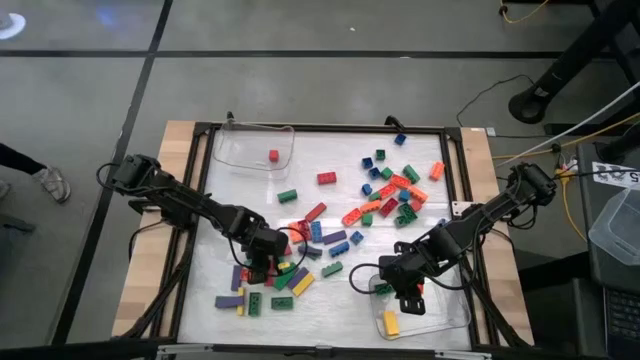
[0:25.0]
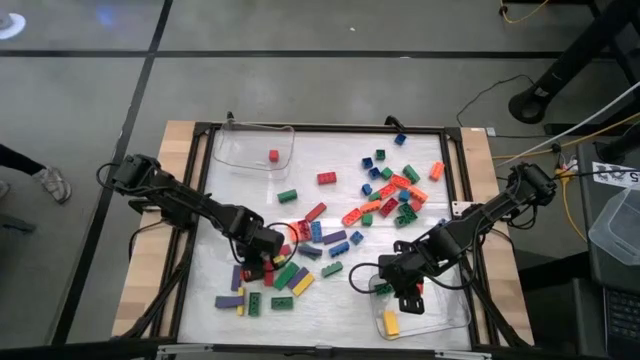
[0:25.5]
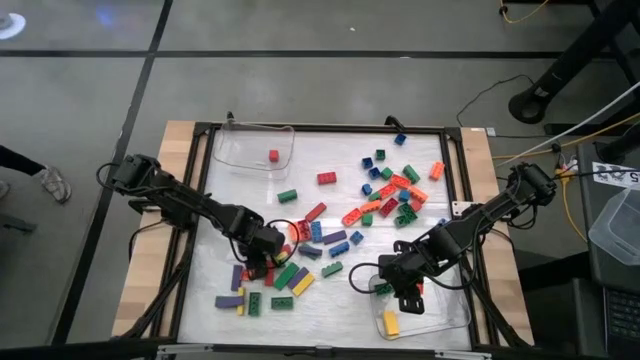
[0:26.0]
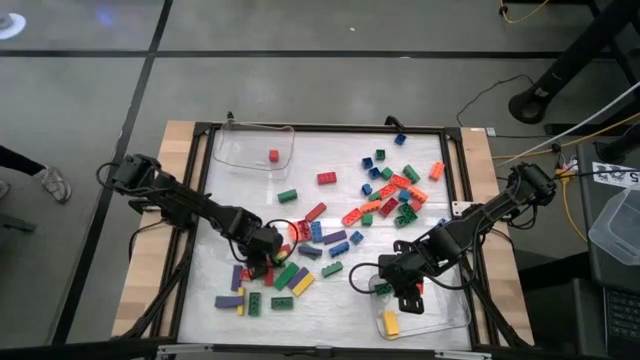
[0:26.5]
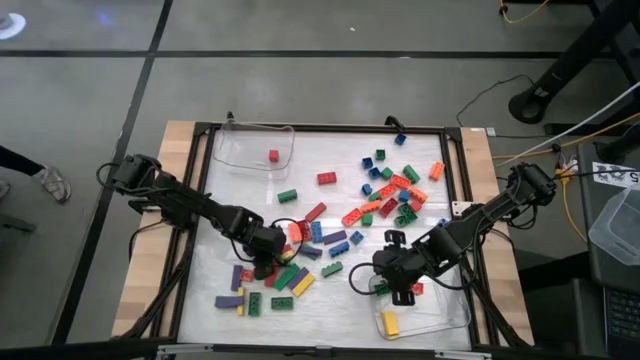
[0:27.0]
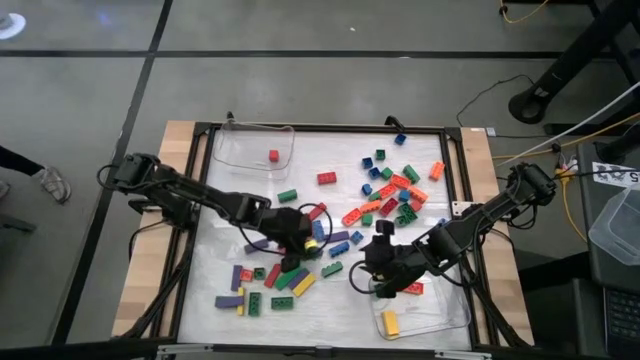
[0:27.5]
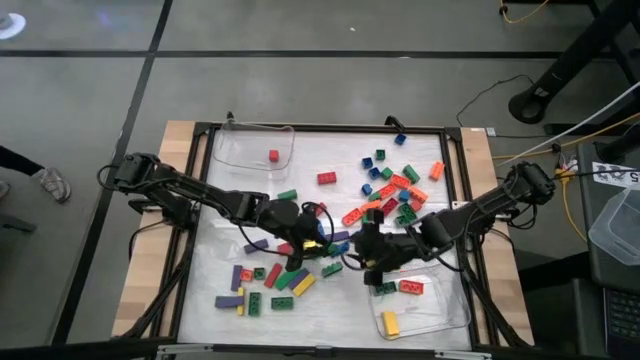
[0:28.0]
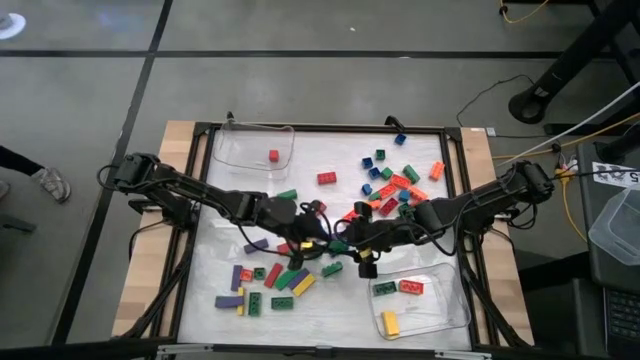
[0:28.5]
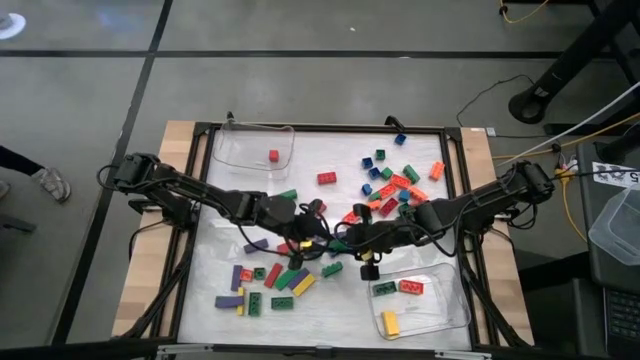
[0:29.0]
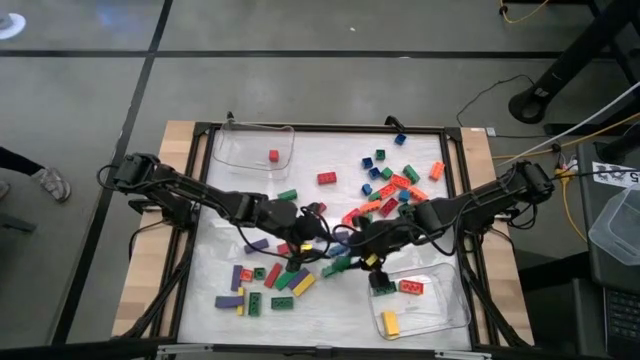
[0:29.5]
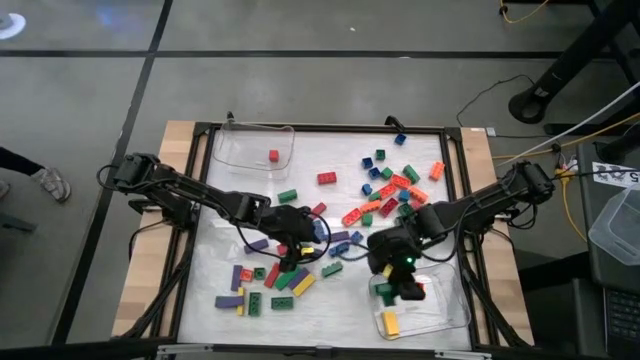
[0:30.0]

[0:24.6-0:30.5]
Task: Sort blocks by size
Put the rectangular green game piece into the bottom transparent bin

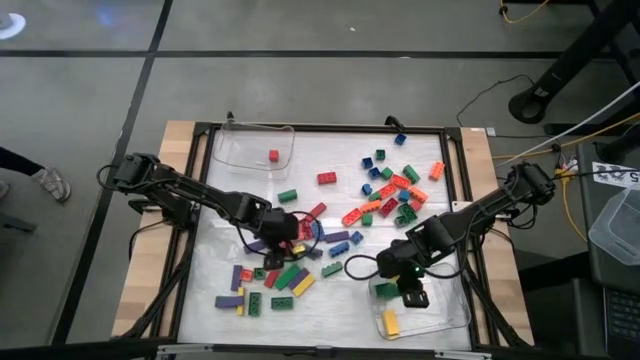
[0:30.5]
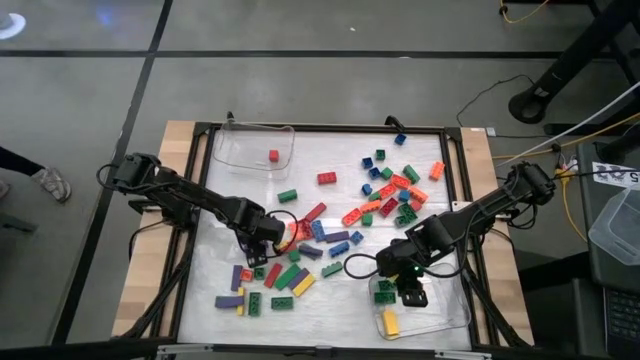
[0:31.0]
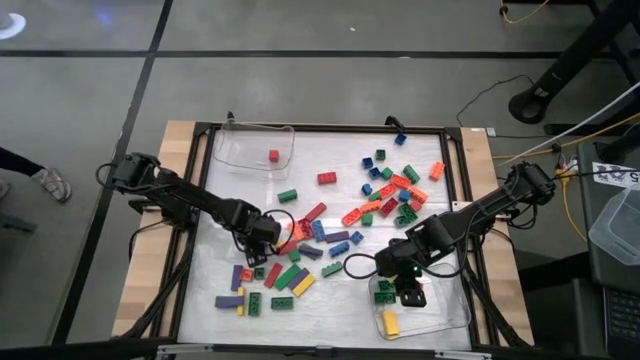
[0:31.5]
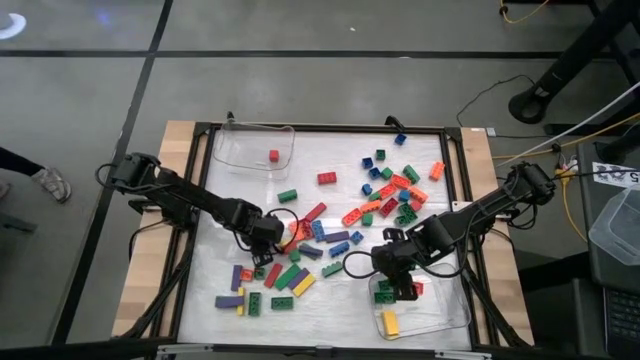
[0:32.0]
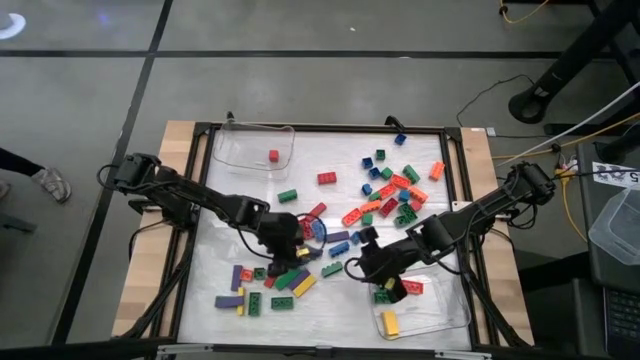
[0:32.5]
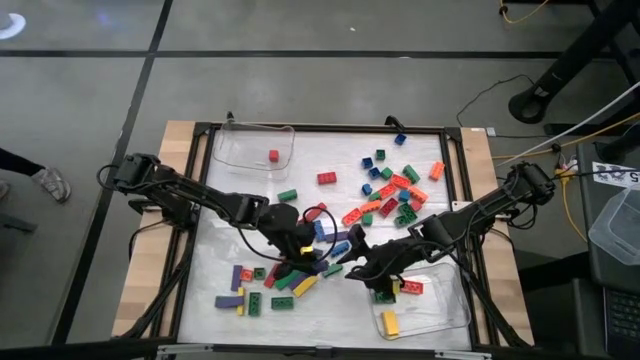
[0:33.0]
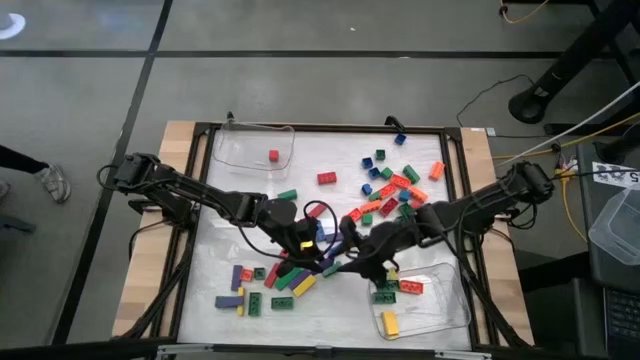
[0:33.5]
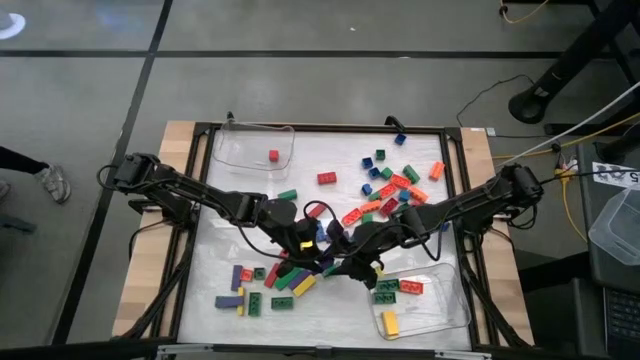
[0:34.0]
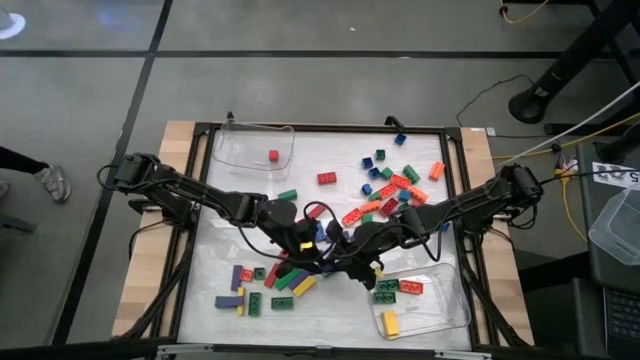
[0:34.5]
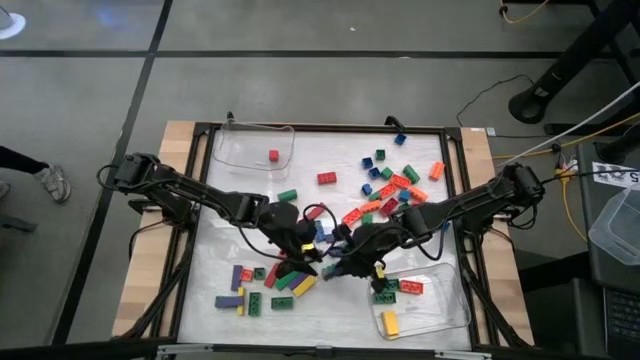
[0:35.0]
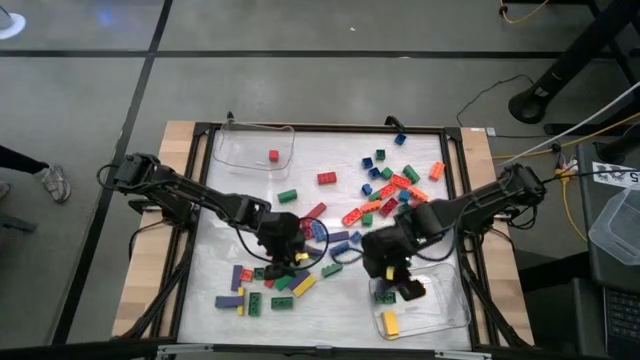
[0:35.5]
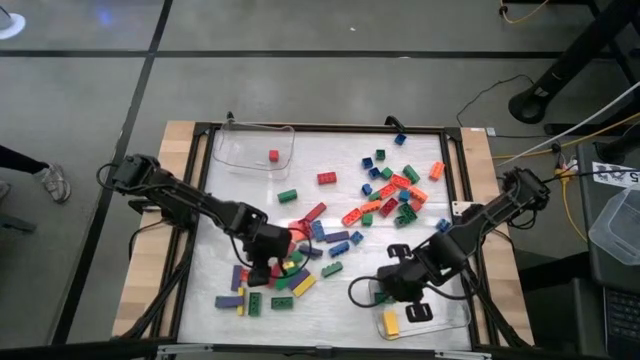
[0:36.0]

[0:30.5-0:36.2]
Put the rectangular violet block into the bottom transparent bin

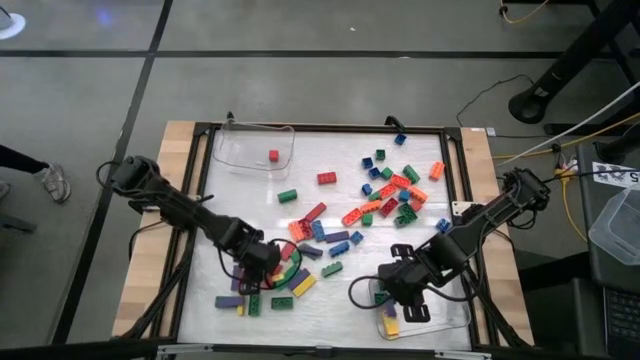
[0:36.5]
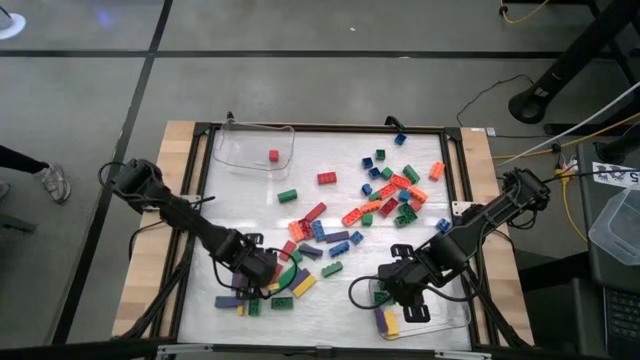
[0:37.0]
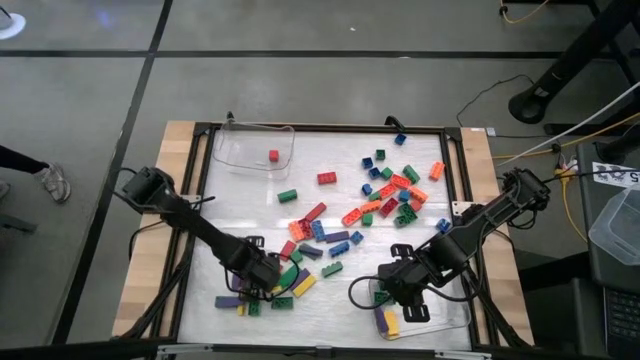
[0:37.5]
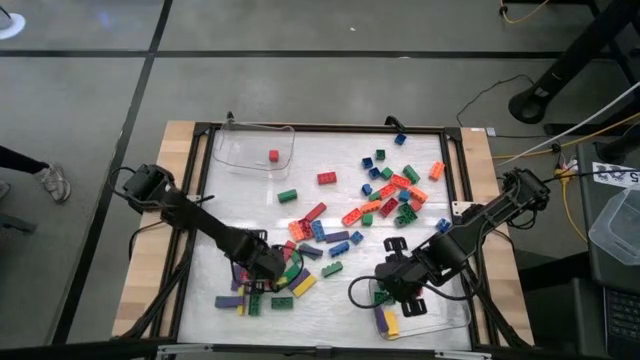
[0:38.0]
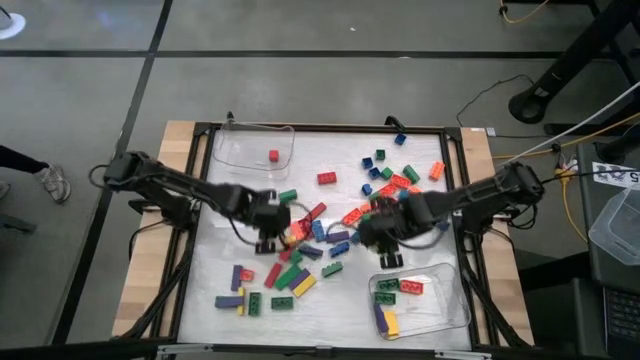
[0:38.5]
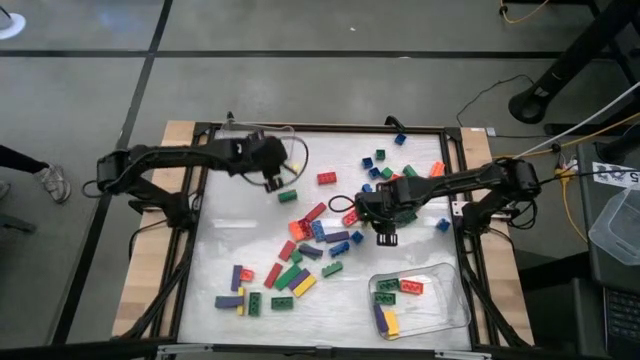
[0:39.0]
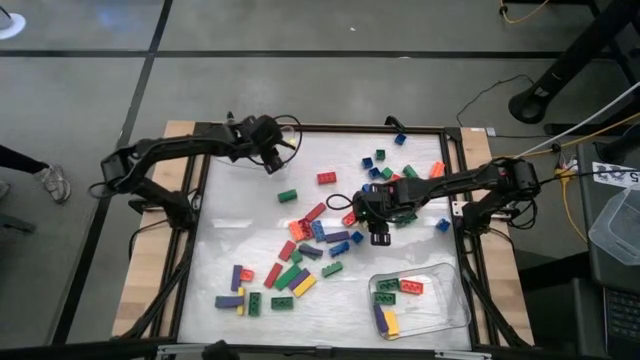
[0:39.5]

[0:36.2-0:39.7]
Put the square green game piece into the top transparent bin

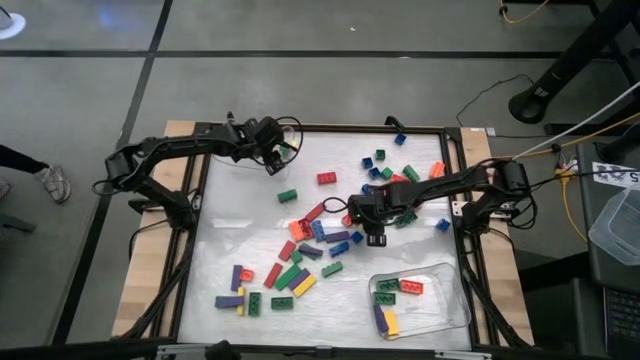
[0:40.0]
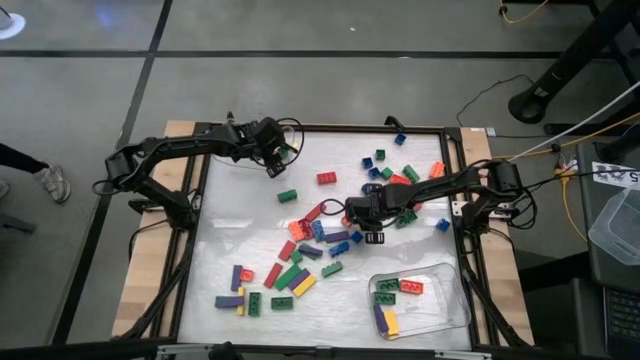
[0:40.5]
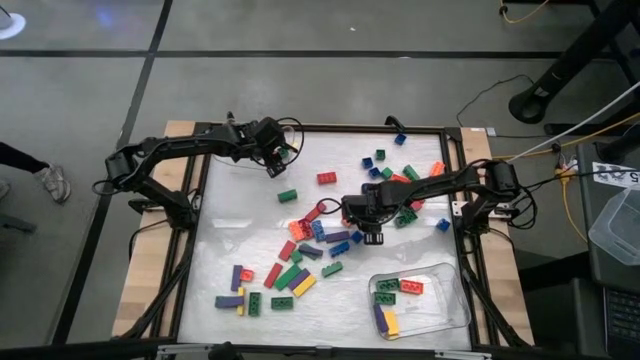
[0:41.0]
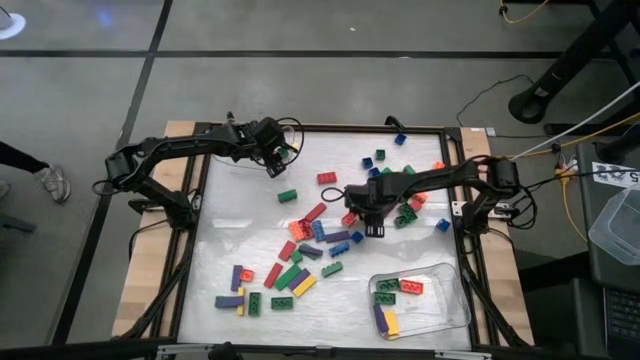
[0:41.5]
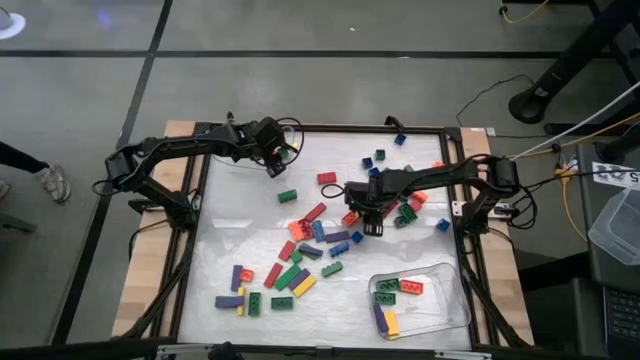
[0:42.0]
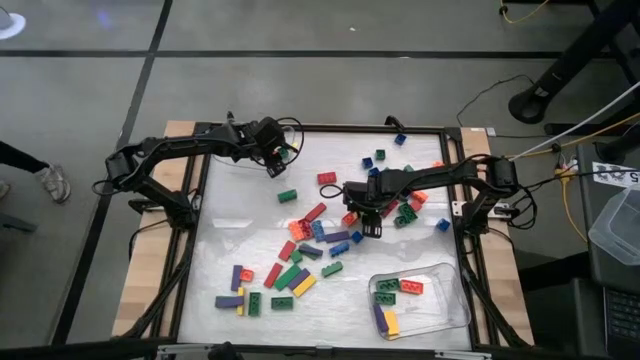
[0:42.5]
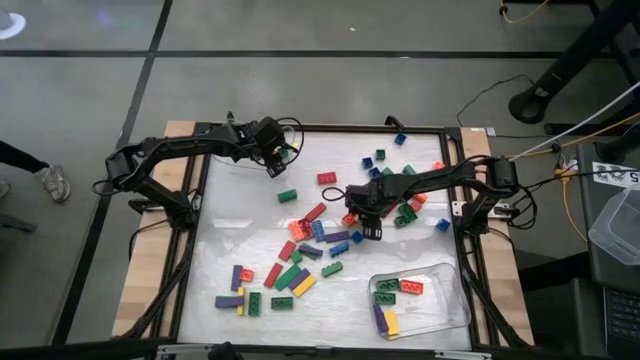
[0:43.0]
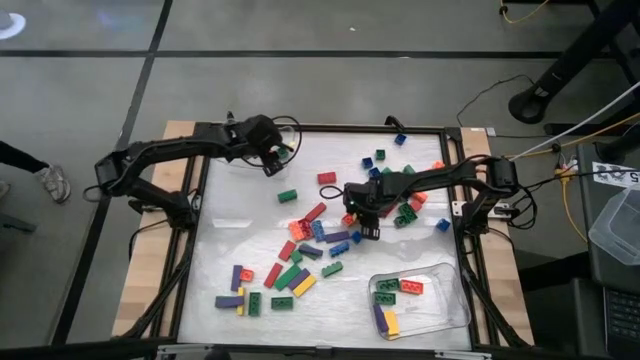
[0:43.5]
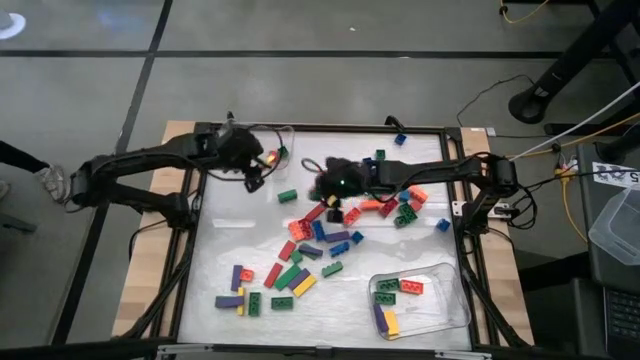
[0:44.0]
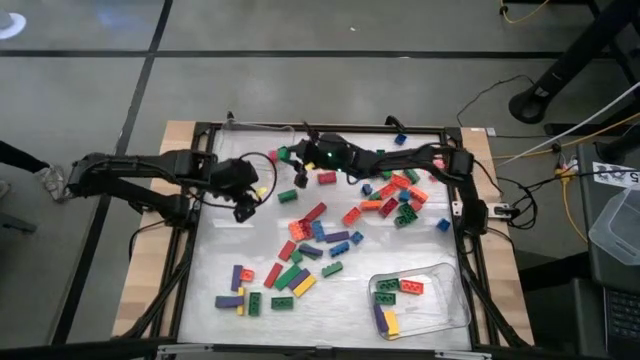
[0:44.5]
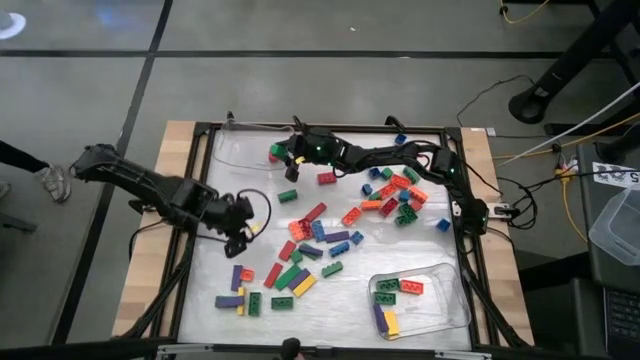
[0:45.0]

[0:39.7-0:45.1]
Put the square green block into the top transparent bin

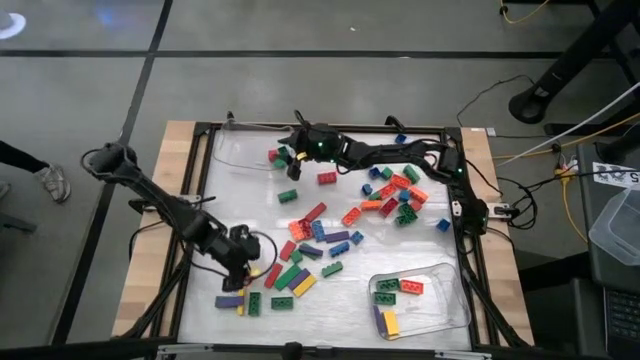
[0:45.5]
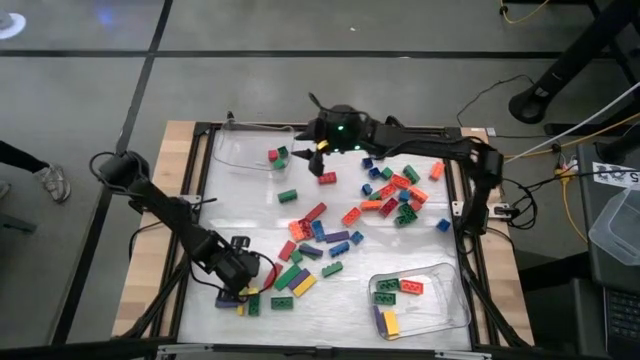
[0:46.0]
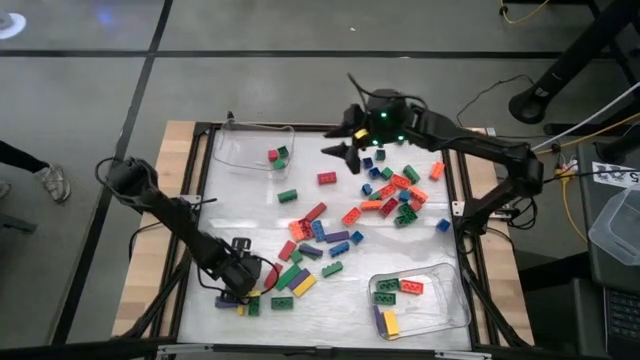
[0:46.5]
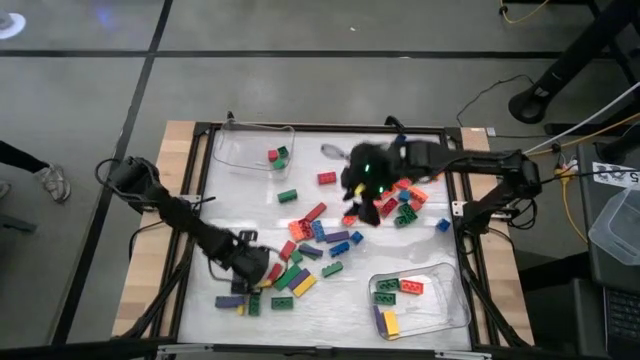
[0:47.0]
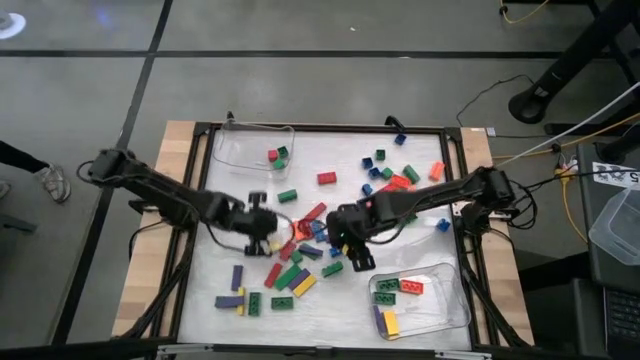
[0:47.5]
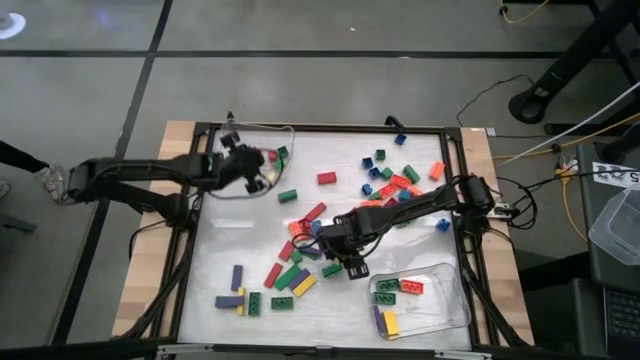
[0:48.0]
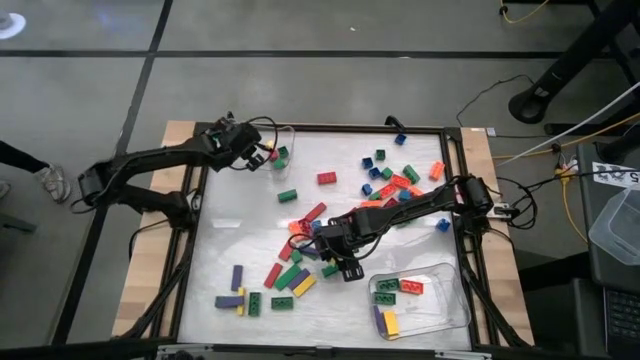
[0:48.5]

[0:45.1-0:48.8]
Put the square orange game piece into the top transparent bin
